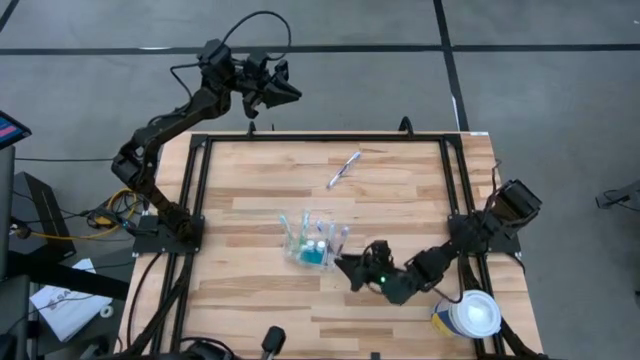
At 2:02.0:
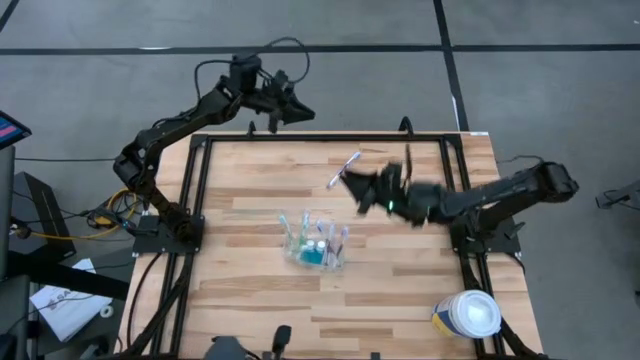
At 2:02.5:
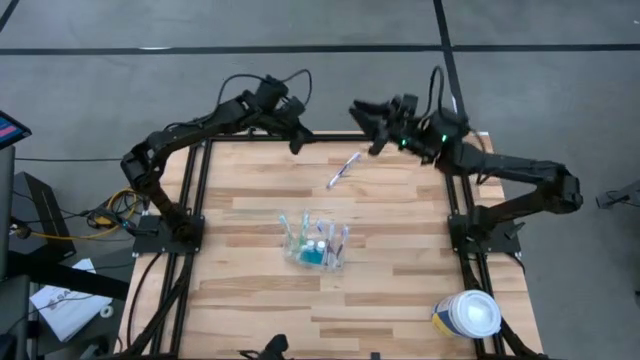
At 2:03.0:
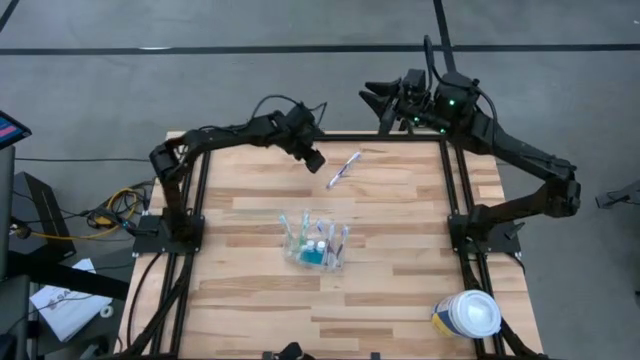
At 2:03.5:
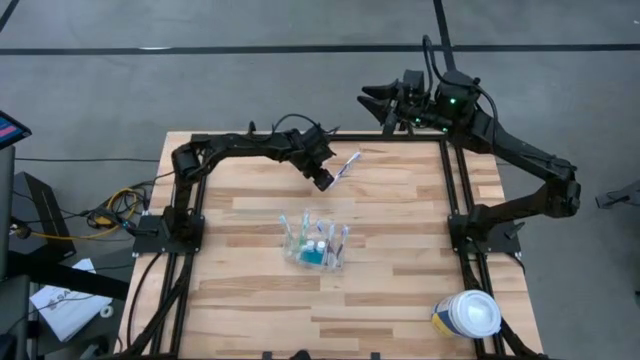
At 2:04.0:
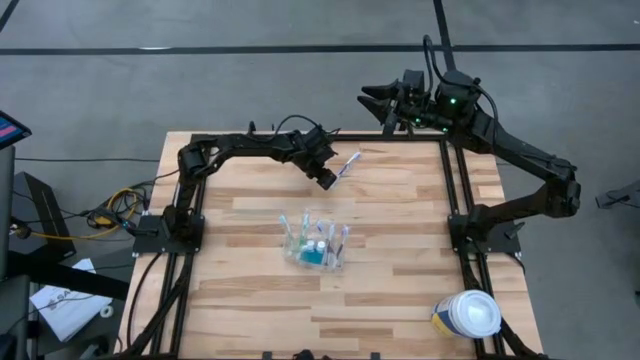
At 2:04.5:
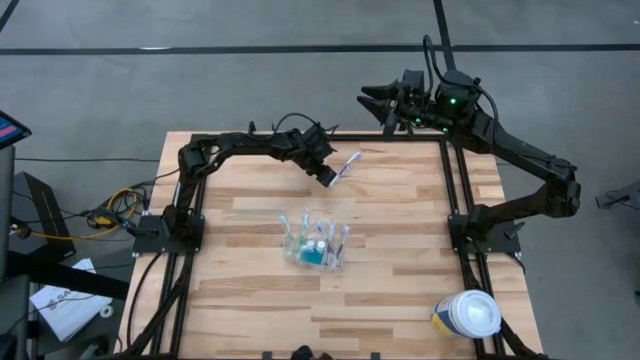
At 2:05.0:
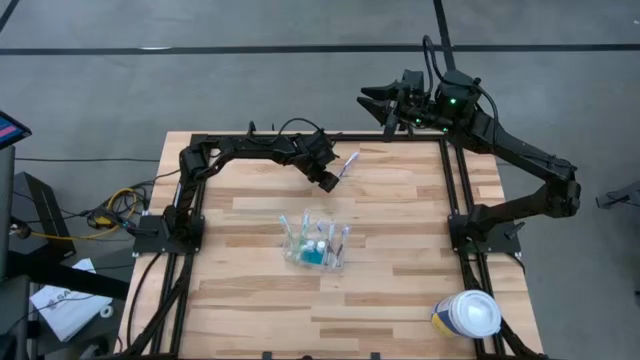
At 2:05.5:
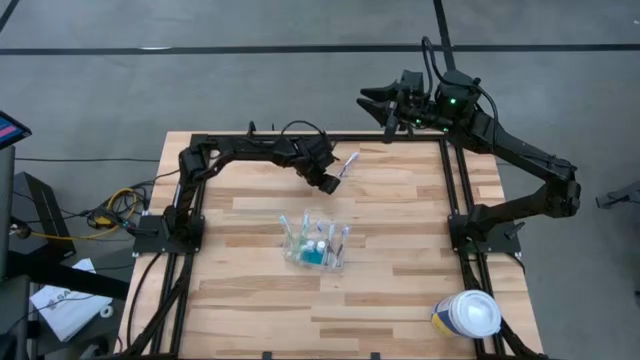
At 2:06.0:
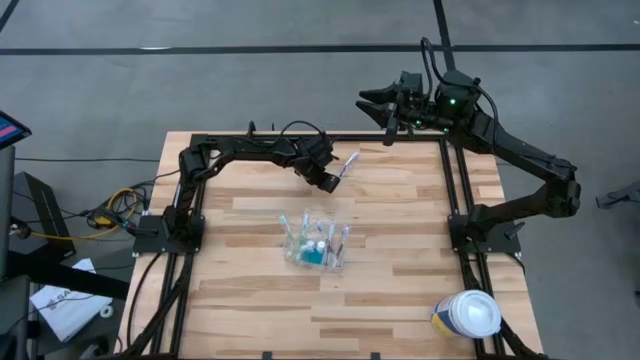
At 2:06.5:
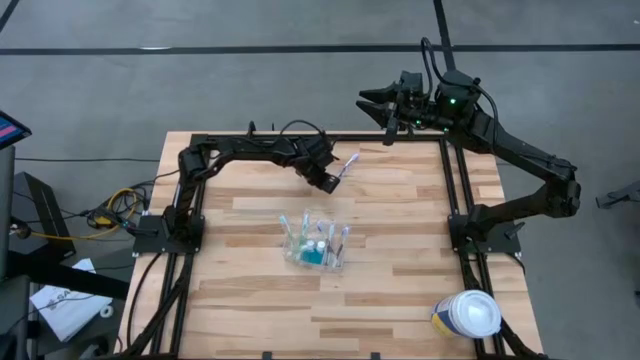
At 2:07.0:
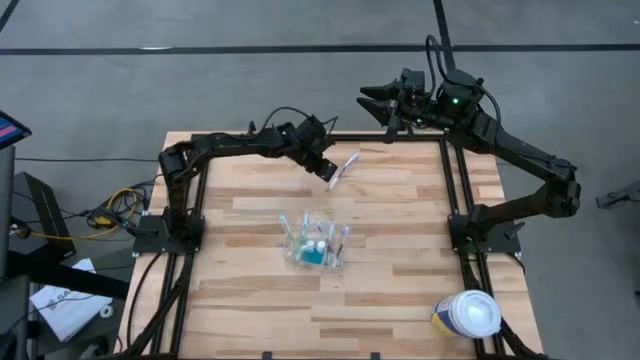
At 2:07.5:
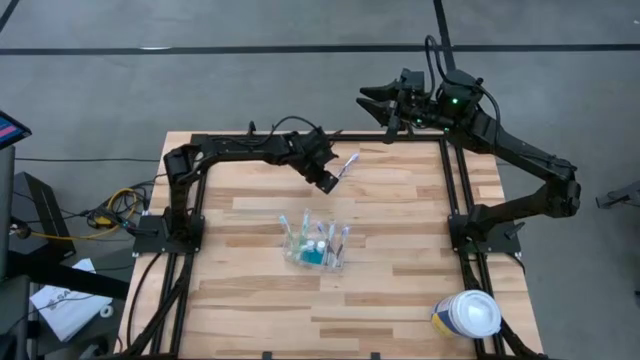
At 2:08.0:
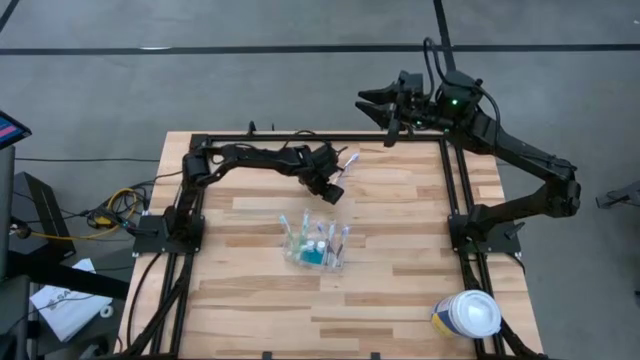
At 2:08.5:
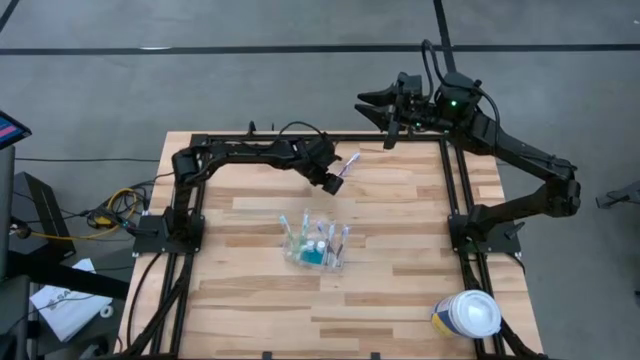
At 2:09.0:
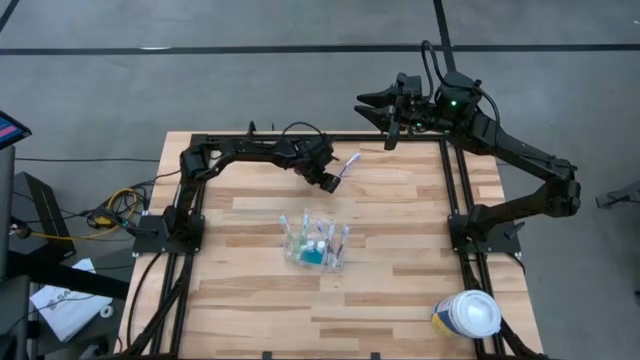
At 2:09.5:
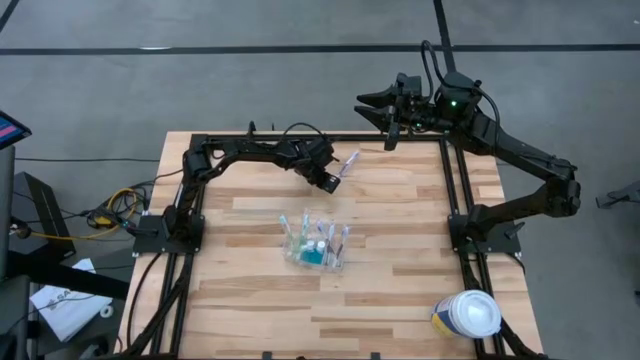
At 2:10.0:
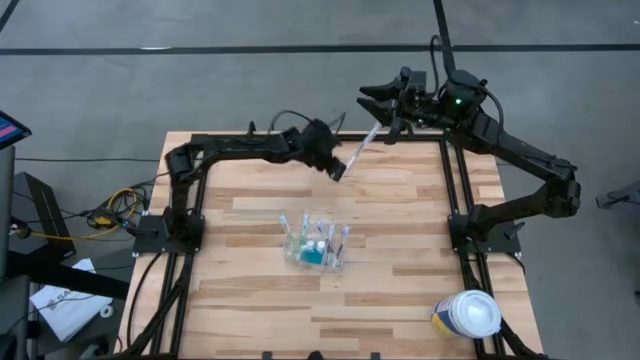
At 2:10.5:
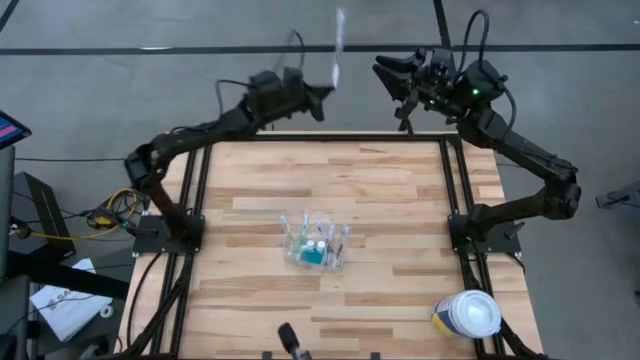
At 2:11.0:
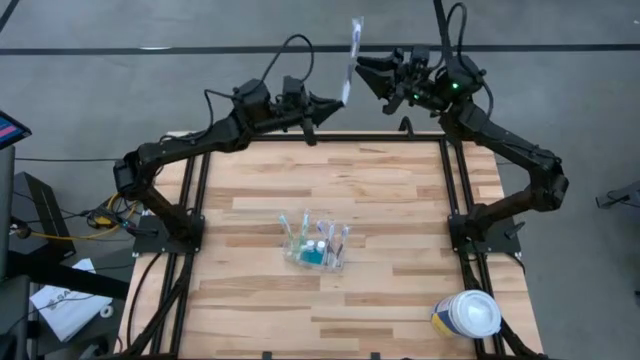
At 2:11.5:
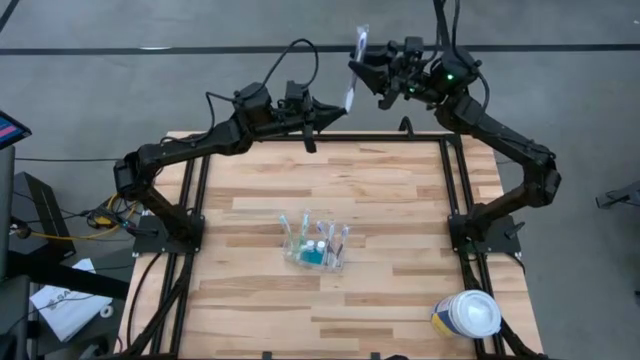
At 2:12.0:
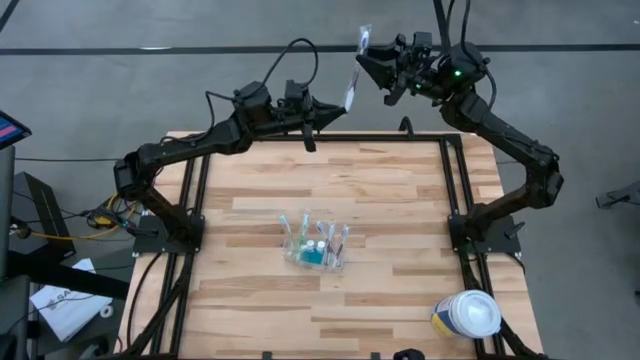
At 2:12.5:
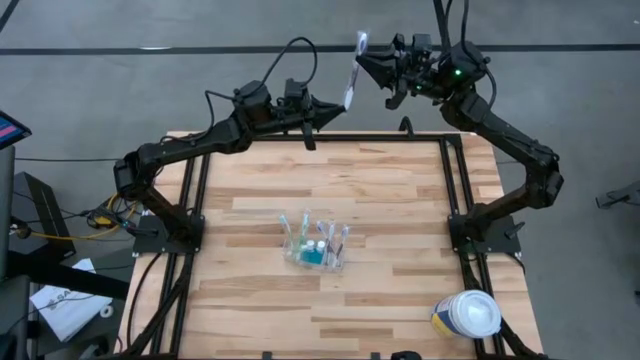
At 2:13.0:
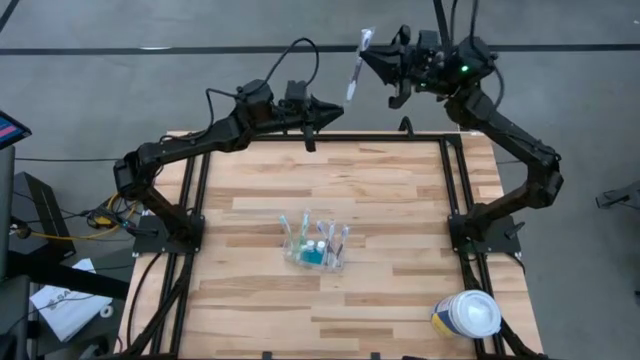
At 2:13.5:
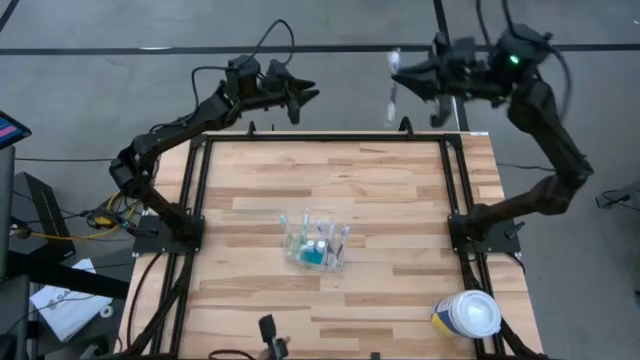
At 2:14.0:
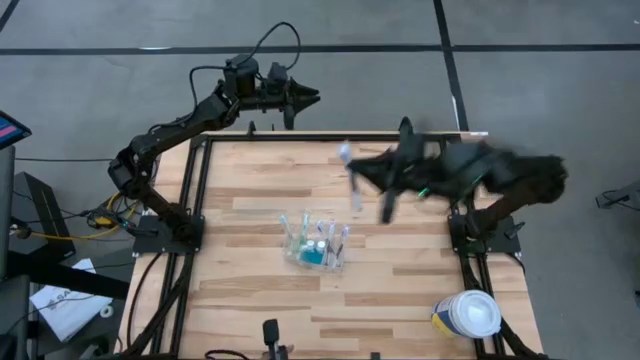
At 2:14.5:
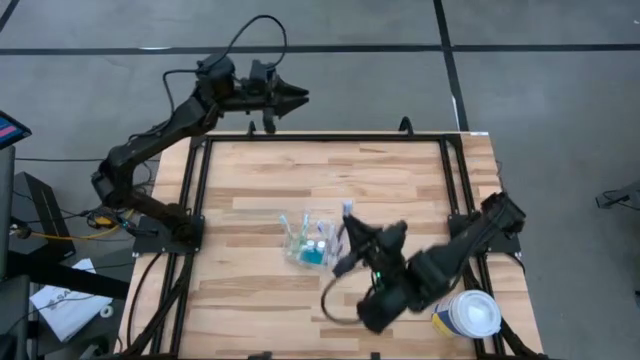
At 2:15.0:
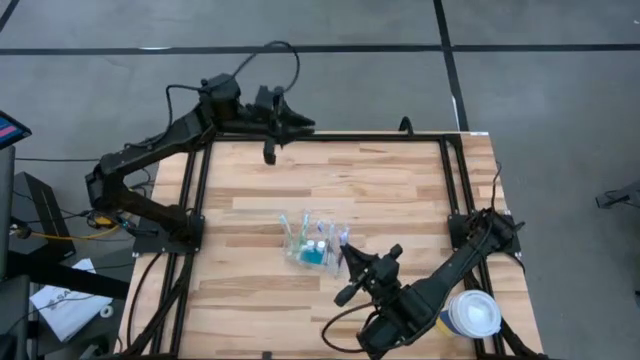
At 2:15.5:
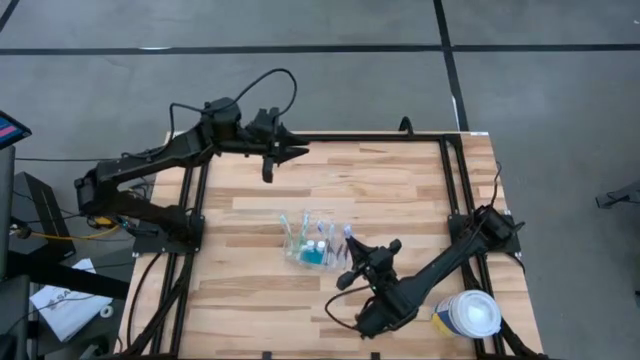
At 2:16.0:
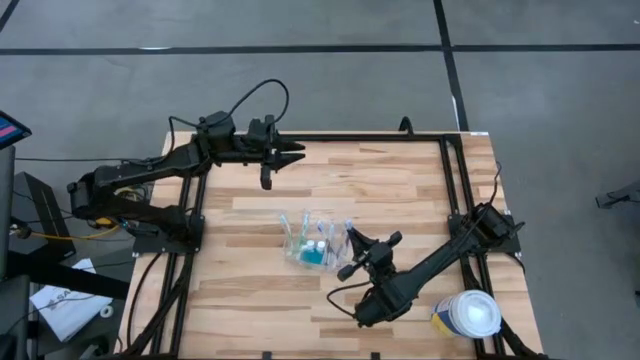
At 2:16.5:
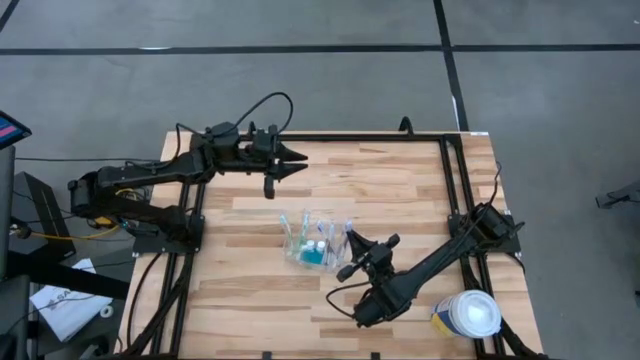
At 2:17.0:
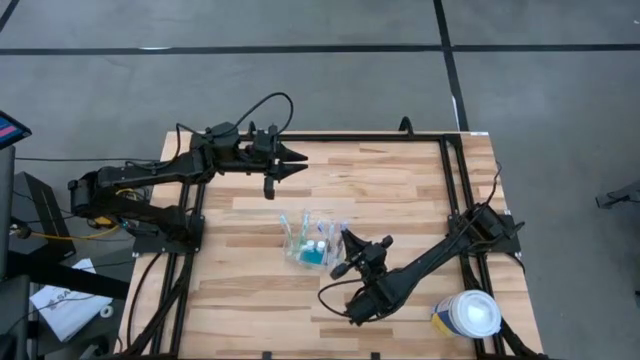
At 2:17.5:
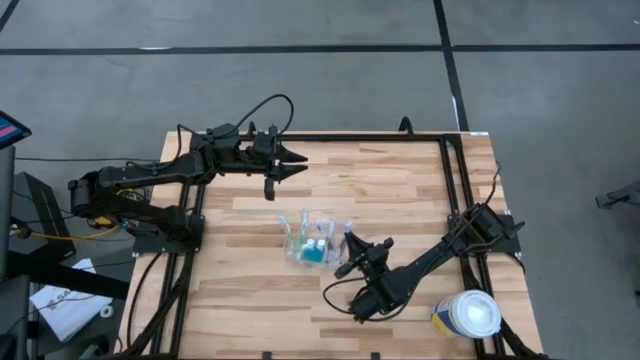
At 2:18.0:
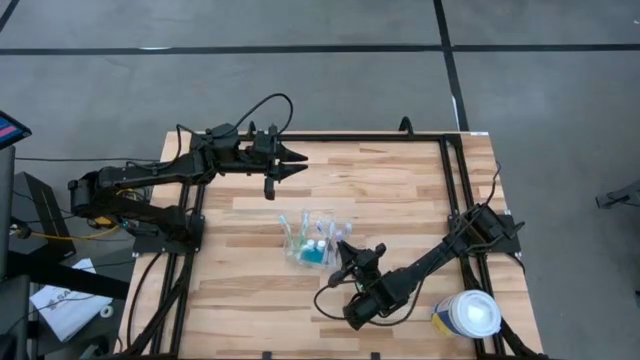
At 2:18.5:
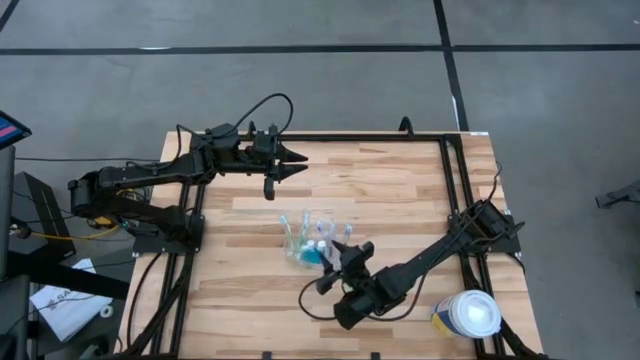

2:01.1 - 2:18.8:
Task: Pick & Place toothbrushing station
Put the purple toothbrush into the transparent organizer

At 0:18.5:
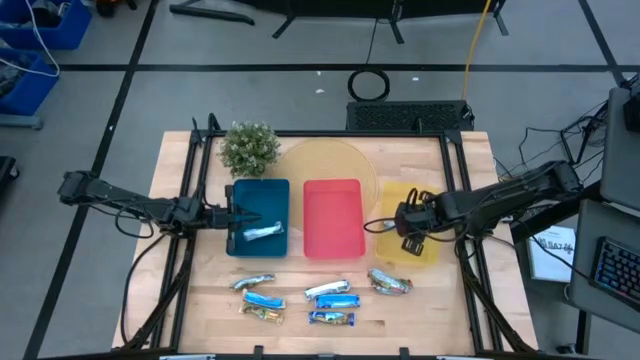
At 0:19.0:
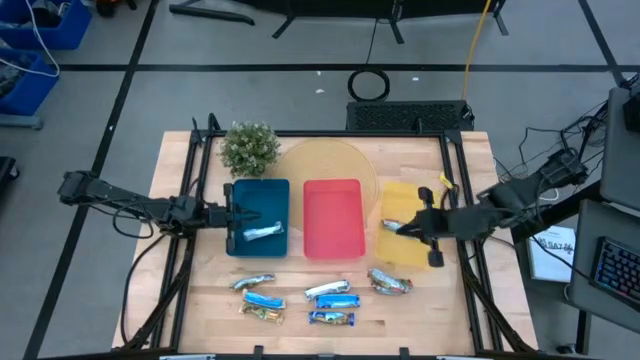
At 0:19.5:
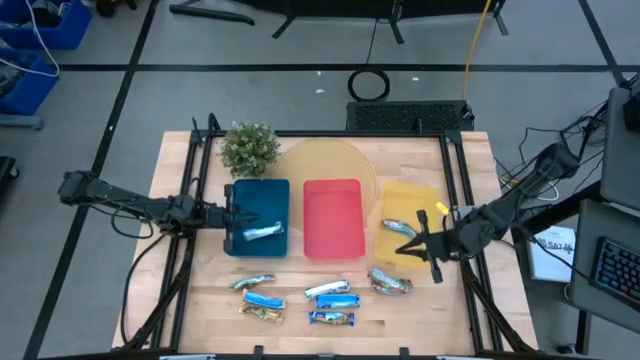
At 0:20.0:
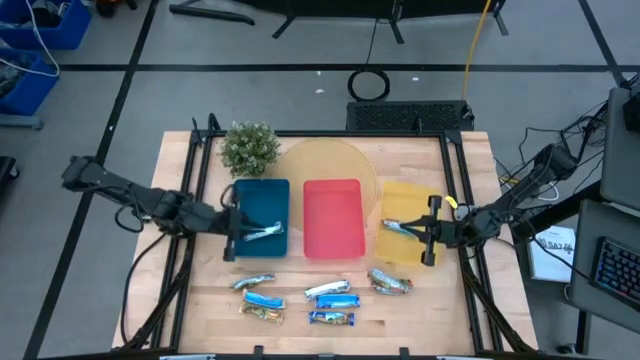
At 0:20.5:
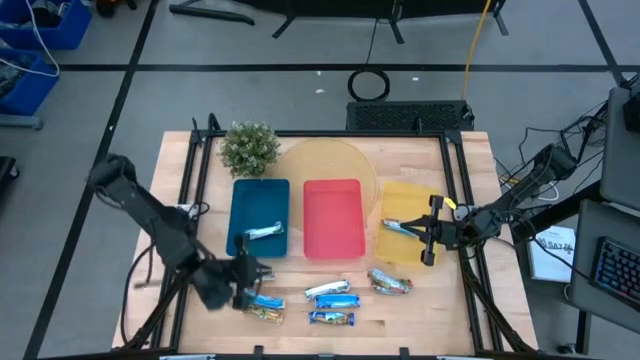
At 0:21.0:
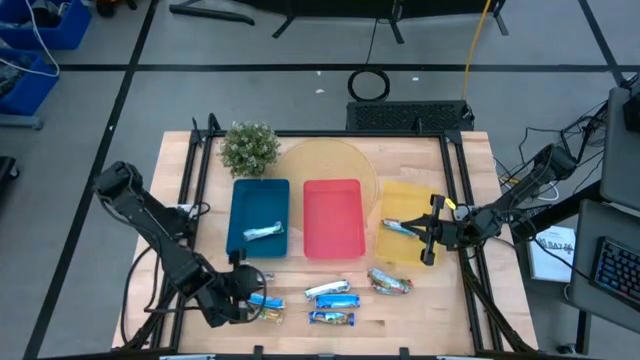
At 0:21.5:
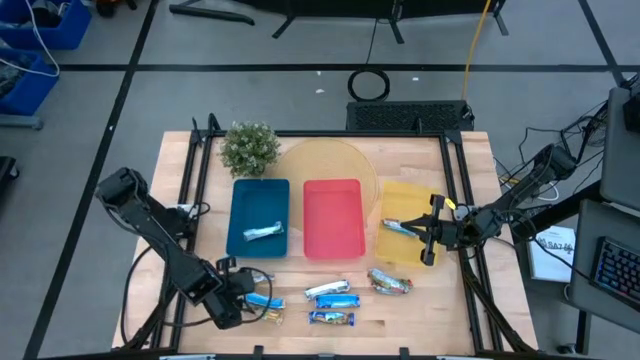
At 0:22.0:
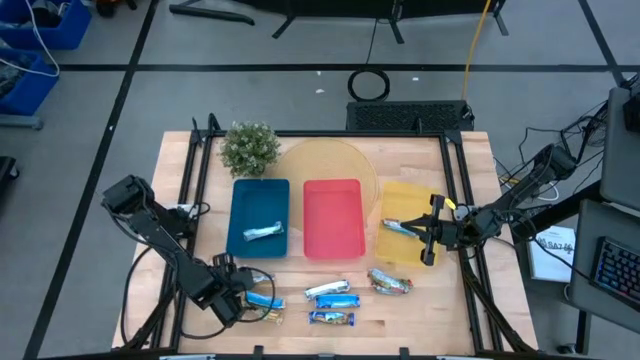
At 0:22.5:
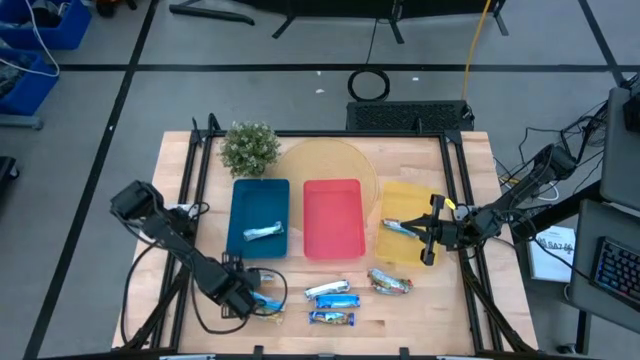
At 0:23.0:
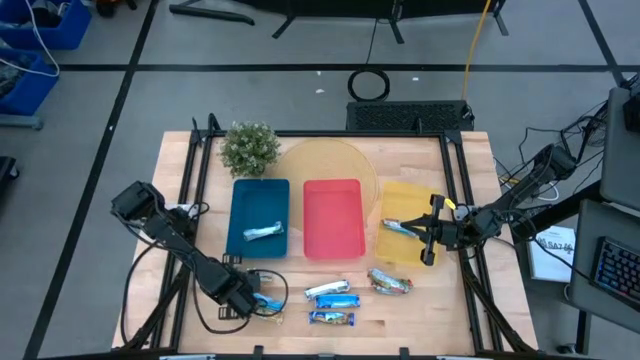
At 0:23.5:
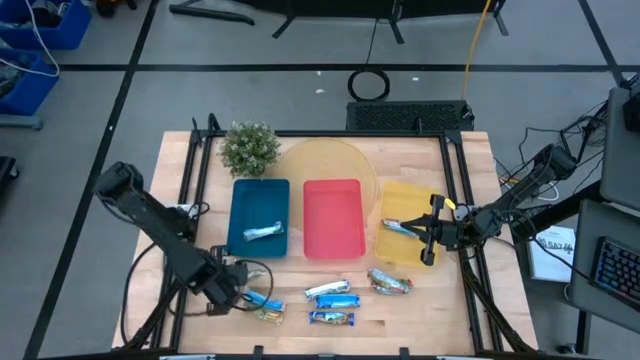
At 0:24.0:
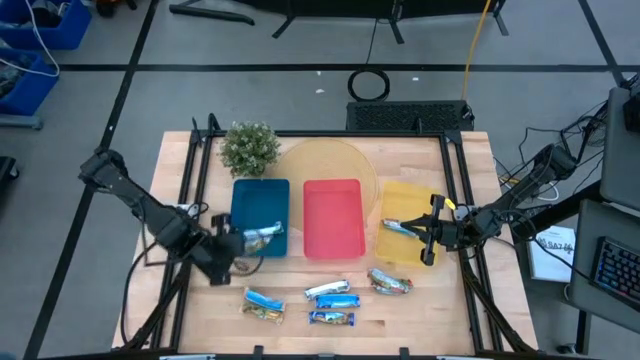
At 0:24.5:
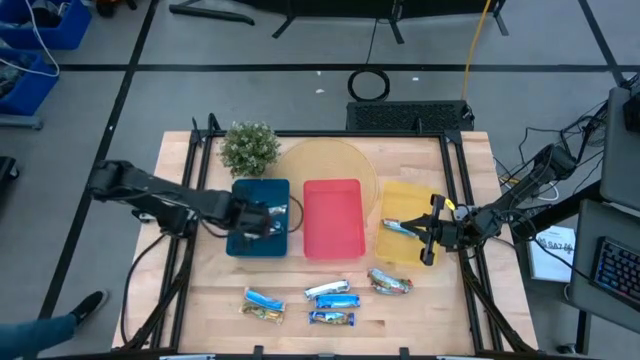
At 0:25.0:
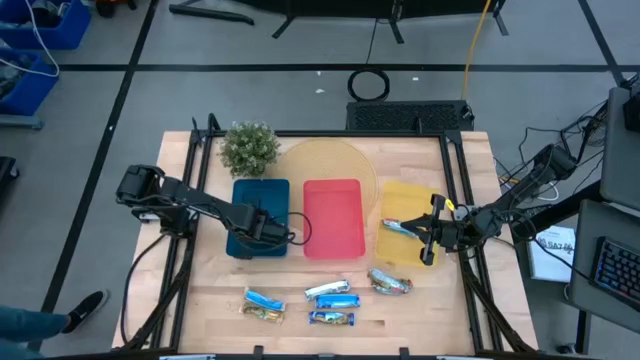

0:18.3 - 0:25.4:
Task: Pick and place Granola Bars by type
Put the yellow granola bar into the blue bin
